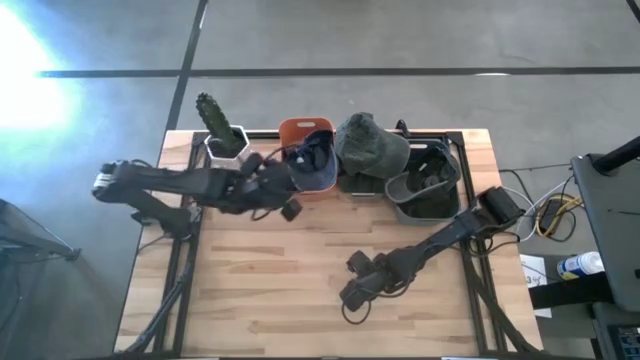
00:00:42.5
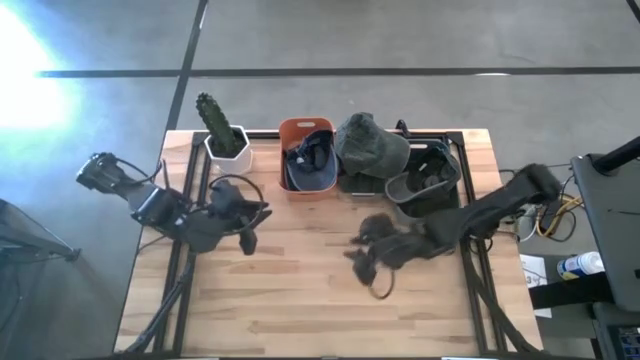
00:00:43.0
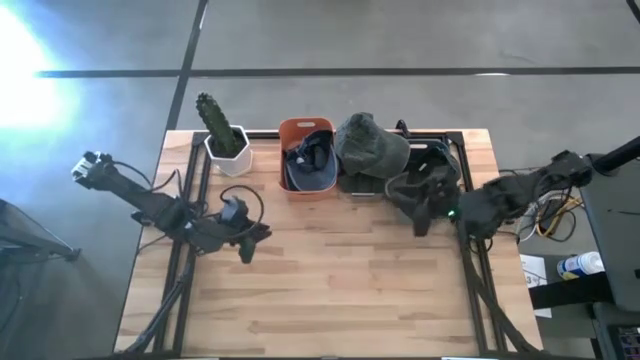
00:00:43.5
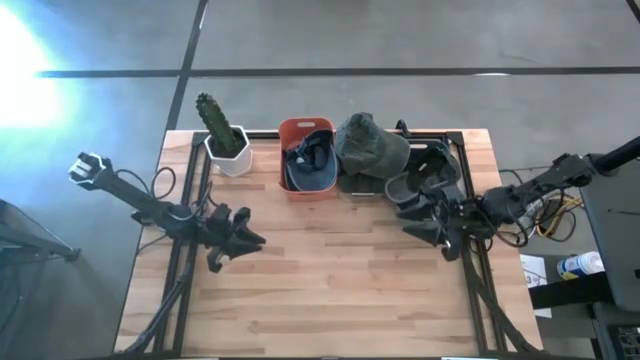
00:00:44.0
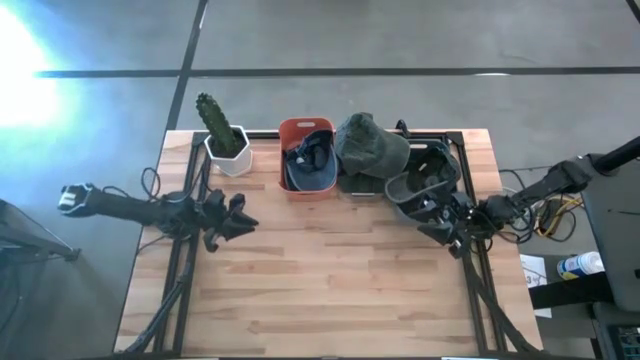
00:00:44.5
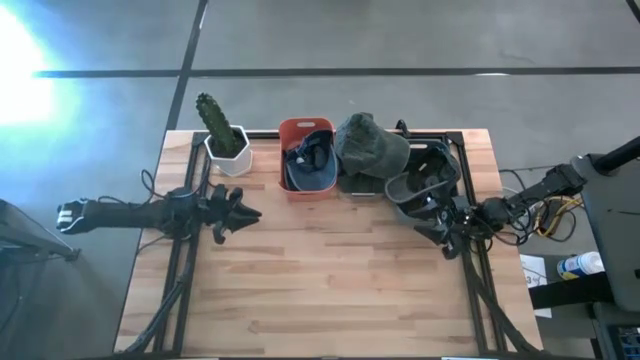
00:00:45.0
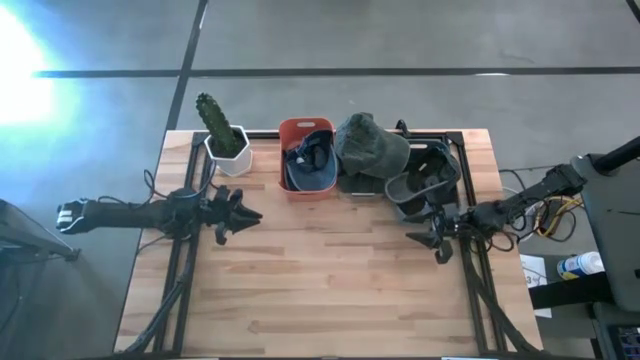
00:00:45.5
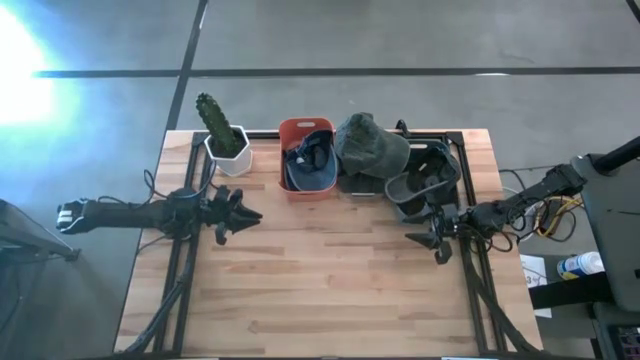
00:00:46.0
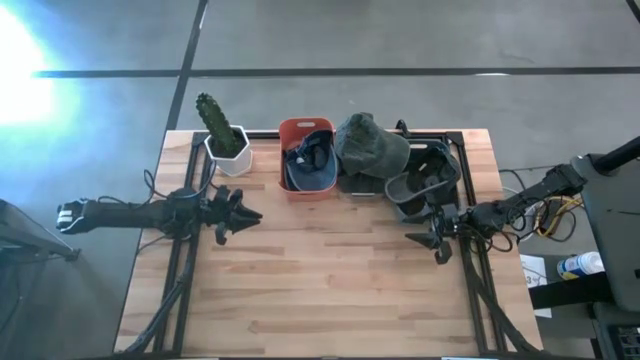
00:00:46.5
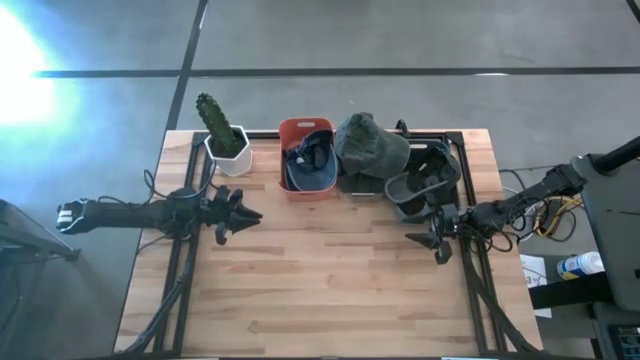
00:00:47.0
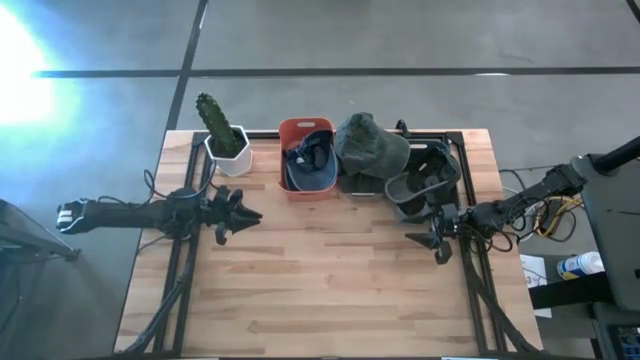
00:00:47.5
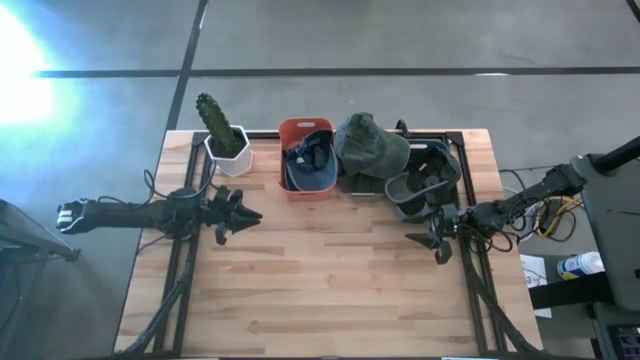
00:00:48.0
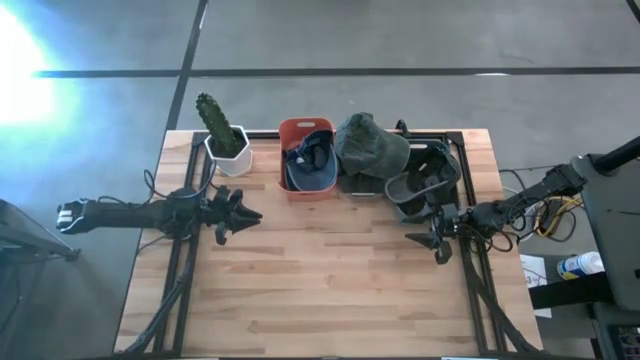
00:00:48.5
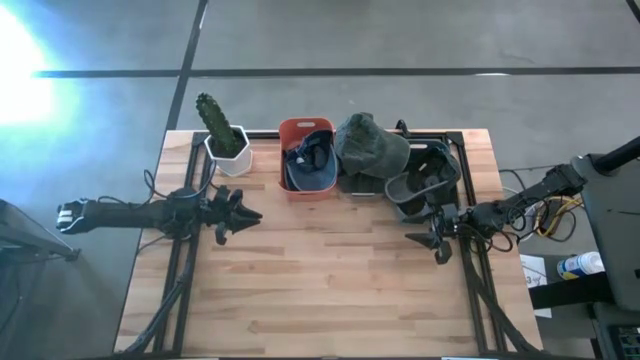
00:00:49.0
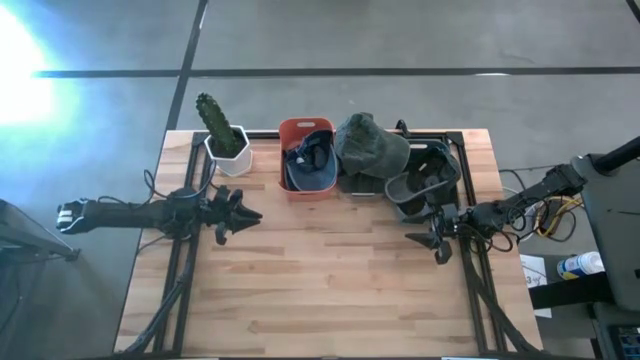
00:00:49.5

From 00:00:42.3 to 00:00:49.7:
Task: Pick & Place hat
Return To Home Position

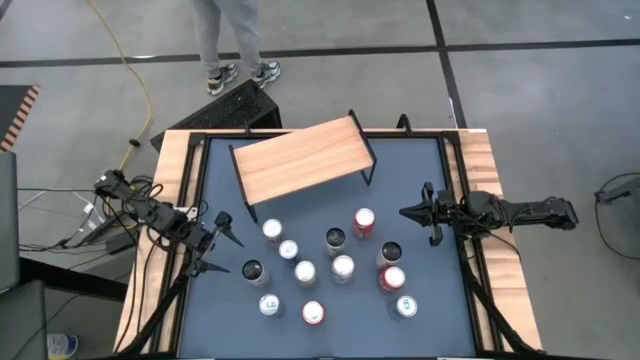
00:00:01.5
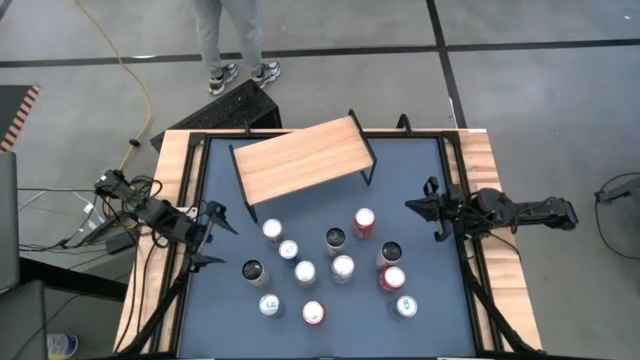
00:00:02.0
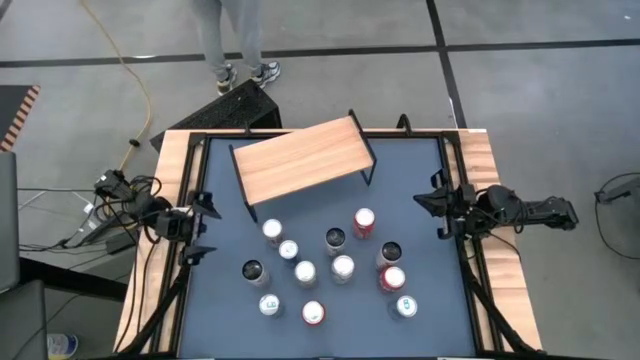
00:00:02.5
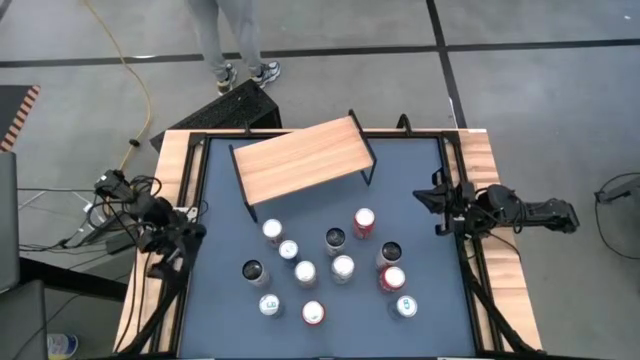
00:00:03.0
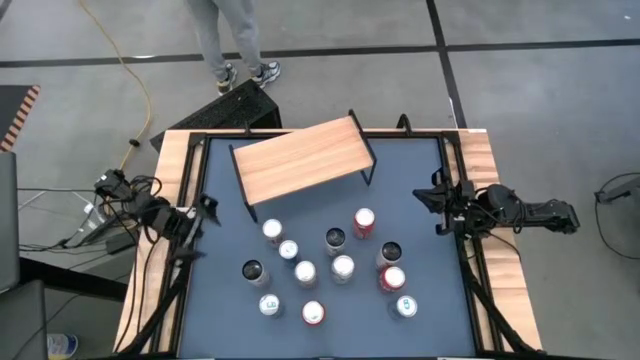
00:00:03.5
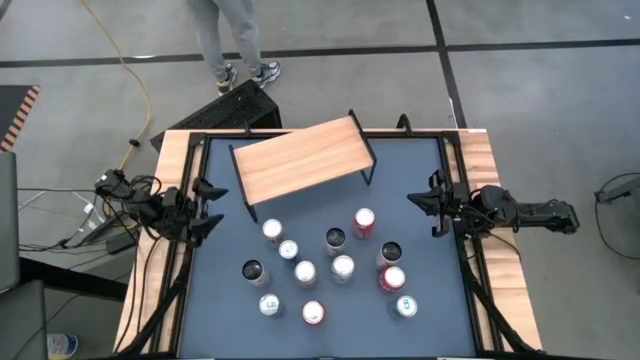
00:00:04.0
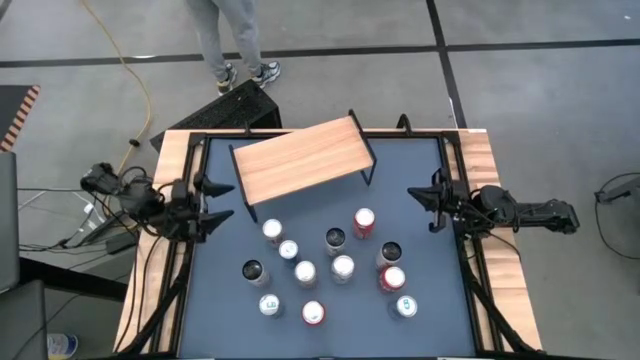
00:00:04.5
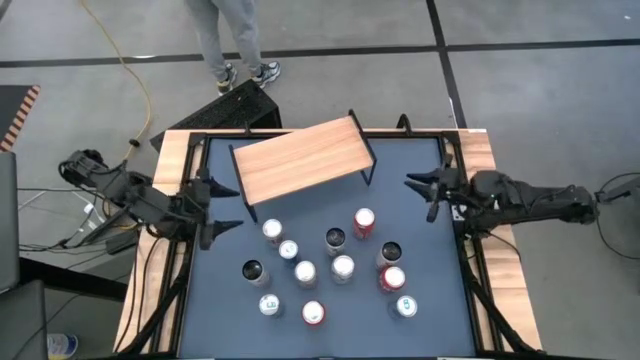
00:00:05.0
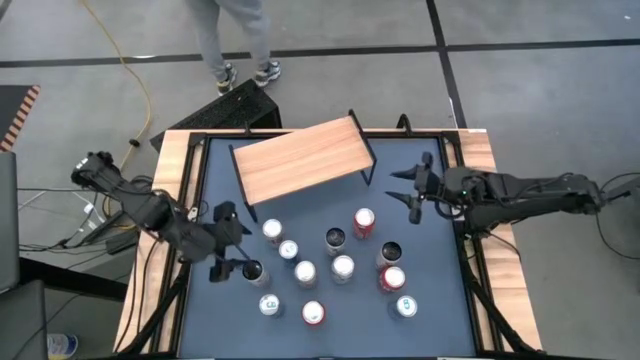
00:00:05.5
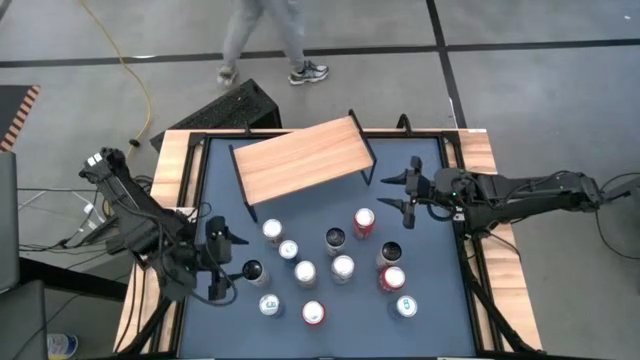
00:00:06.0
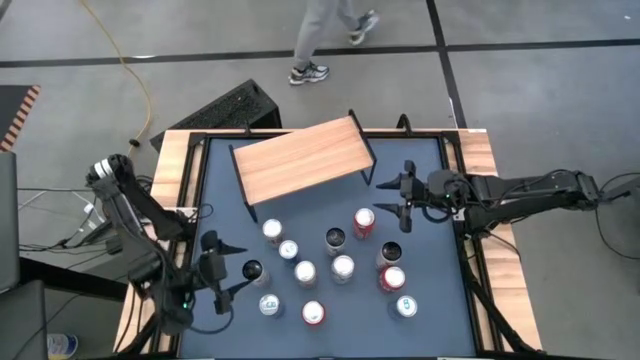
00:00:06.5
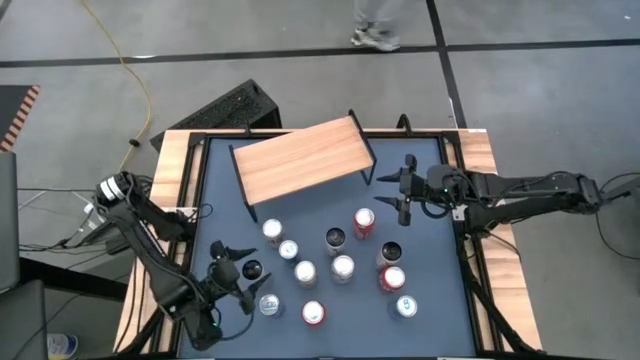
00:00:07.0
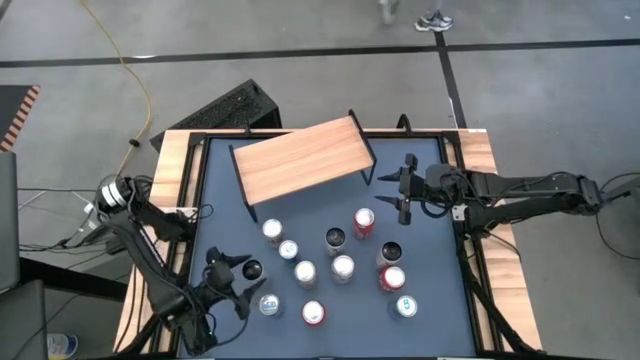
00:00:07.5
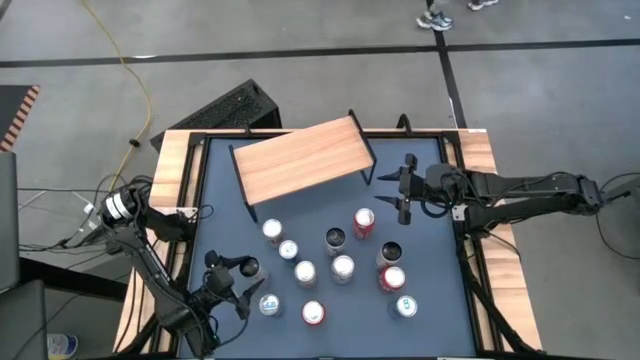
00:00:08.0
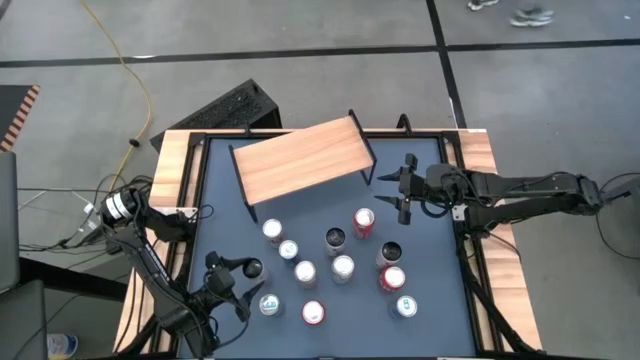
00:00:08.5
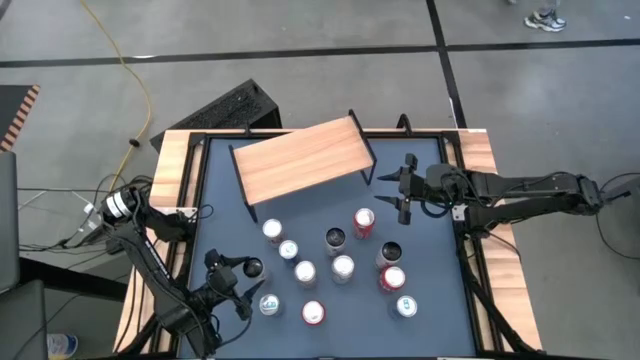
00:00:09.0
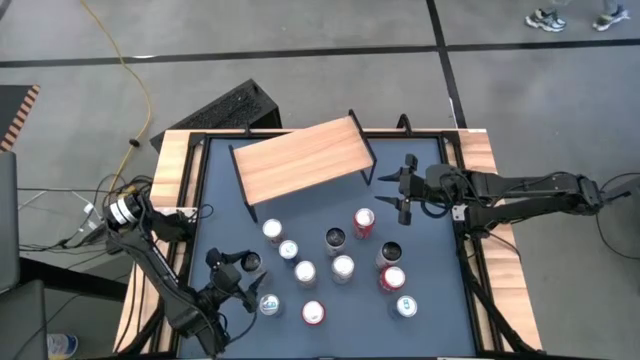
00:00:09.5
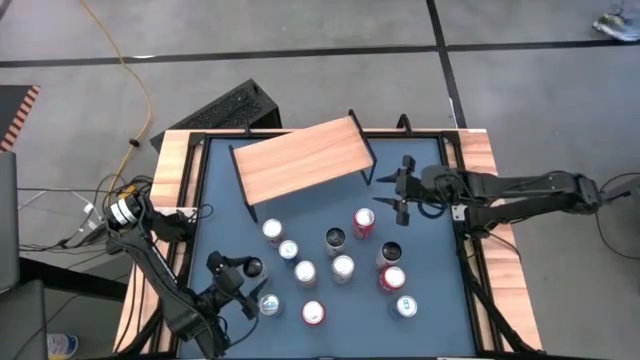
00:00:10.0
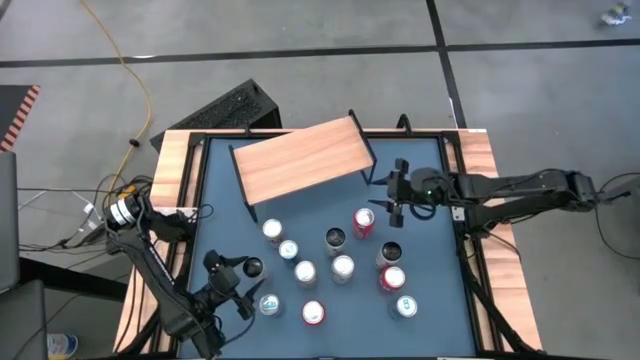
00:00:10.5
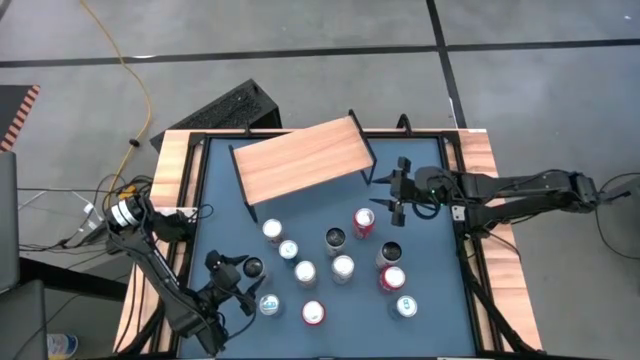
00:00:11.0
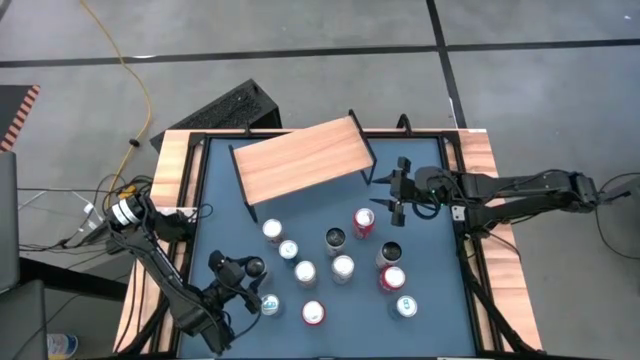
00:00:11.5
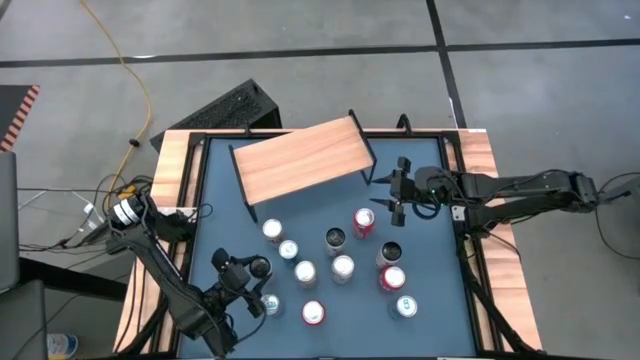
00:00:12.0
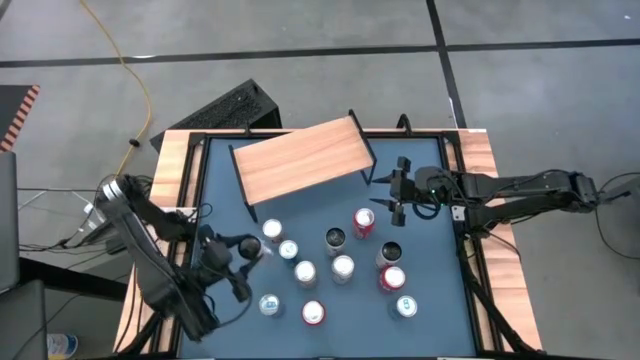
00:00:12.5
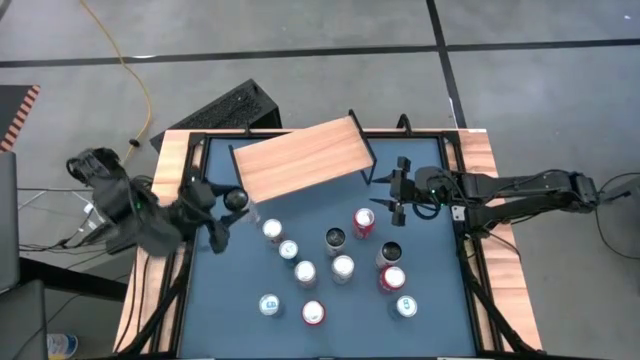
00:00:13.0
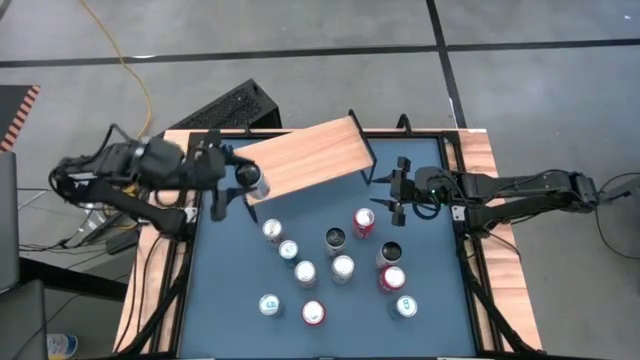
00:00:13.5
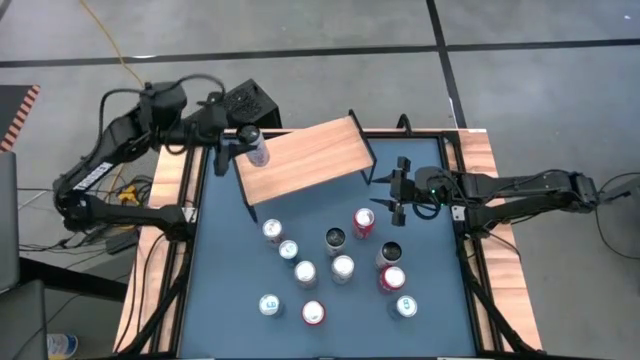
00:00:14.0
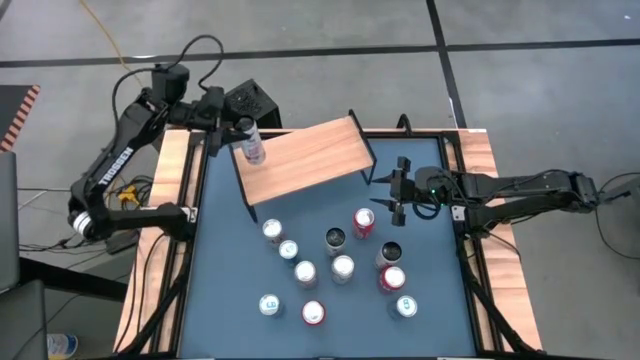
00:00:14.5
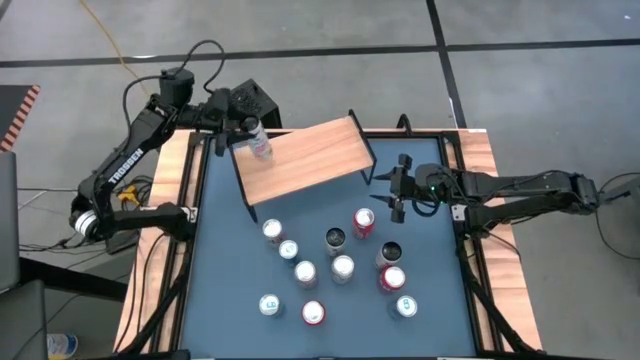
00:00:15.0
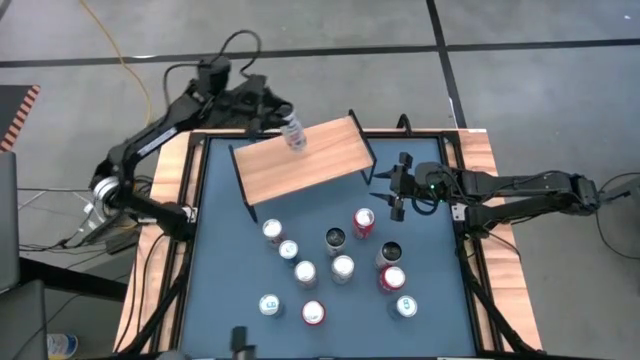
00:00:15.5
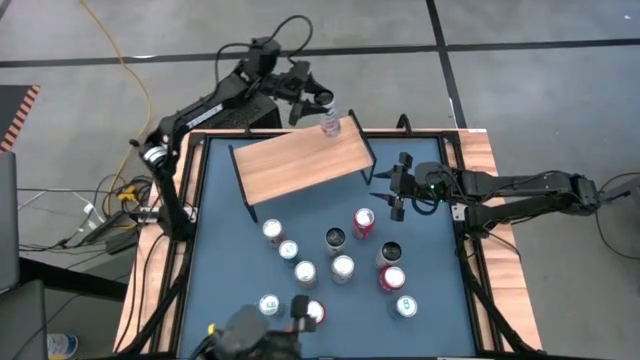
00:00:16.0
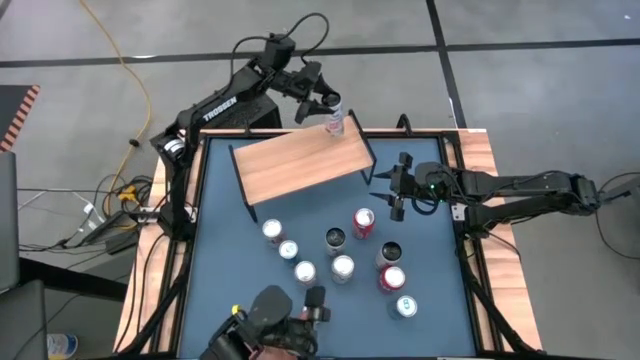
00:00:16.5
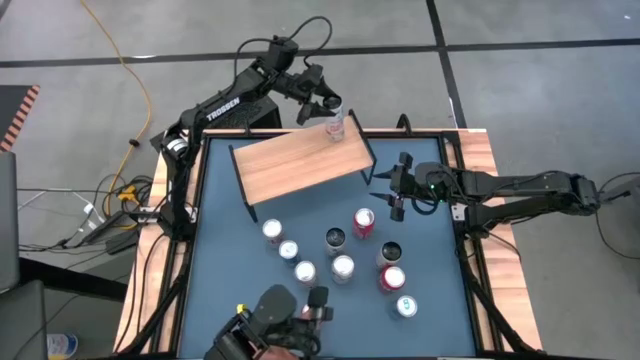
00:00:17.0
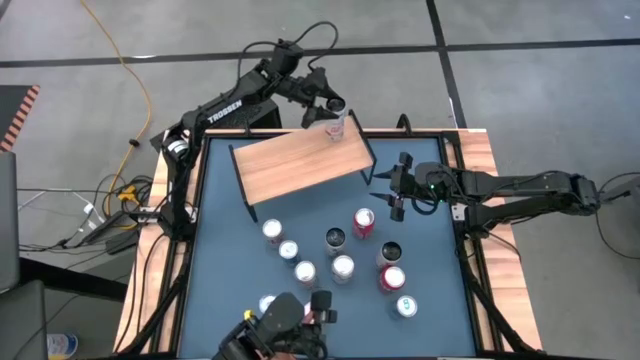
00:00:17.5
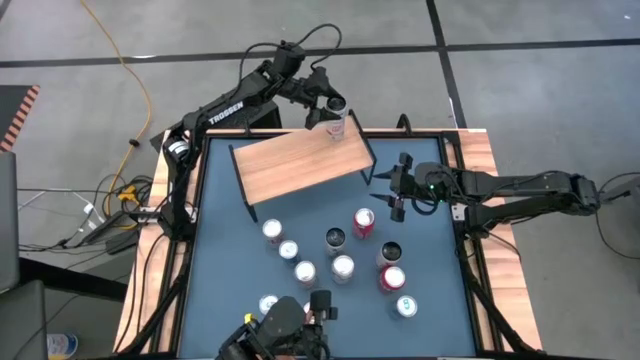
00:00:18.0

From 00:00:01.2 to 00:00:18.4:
Task: Place canned beverage on shelf
Put the left white pink soda can on the shelf
